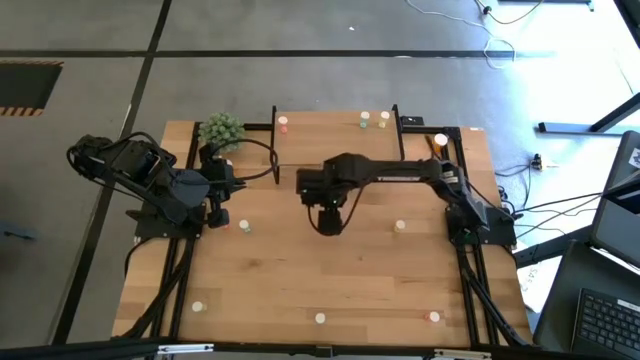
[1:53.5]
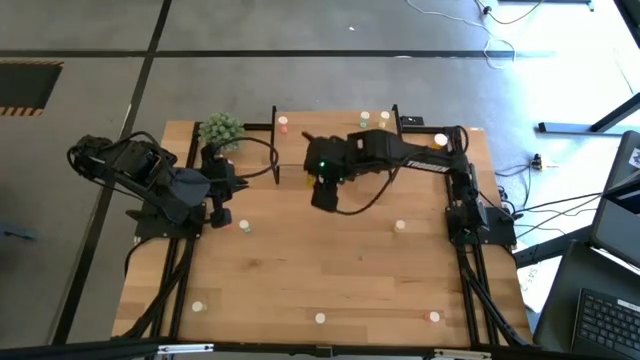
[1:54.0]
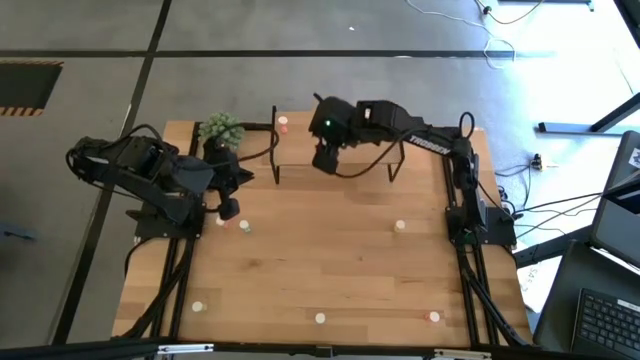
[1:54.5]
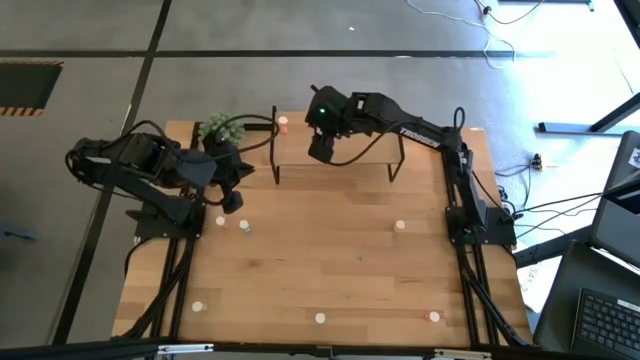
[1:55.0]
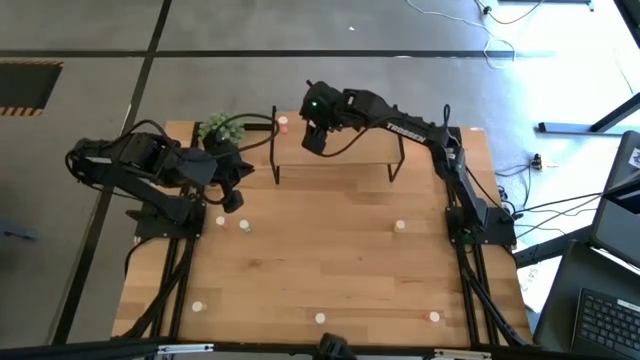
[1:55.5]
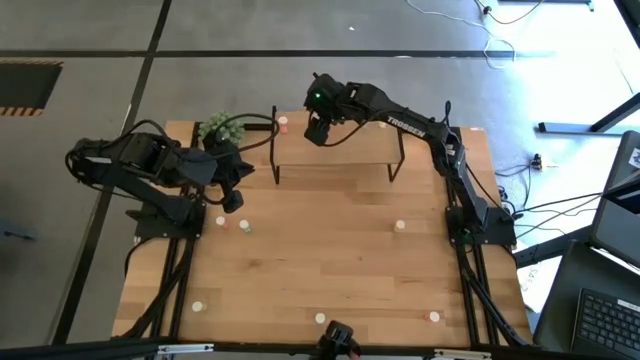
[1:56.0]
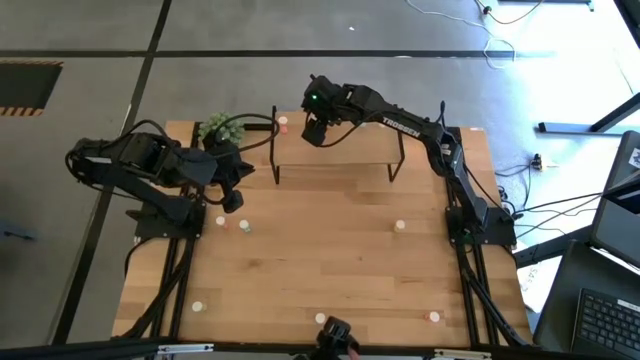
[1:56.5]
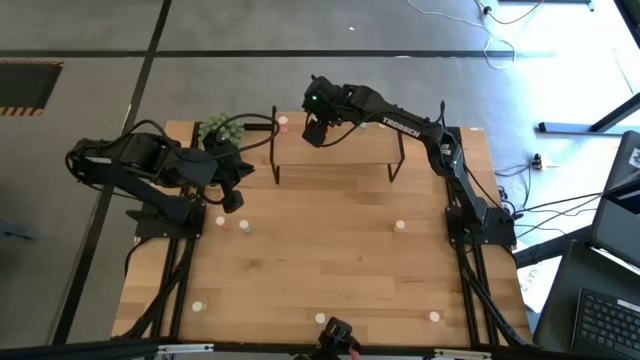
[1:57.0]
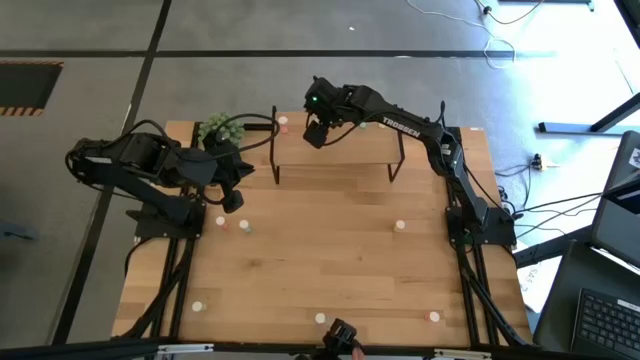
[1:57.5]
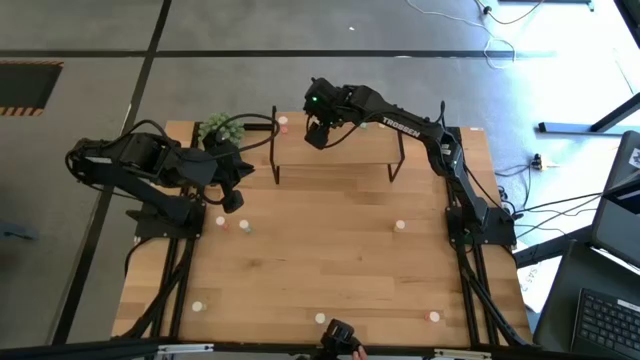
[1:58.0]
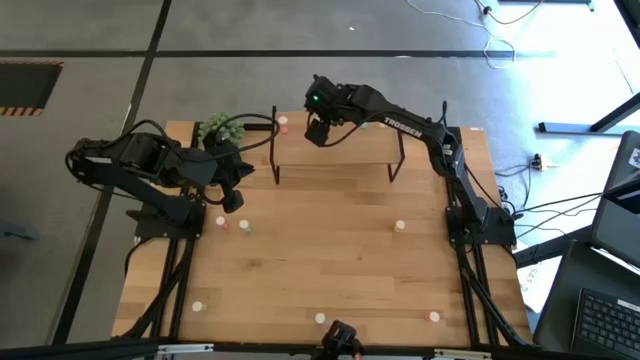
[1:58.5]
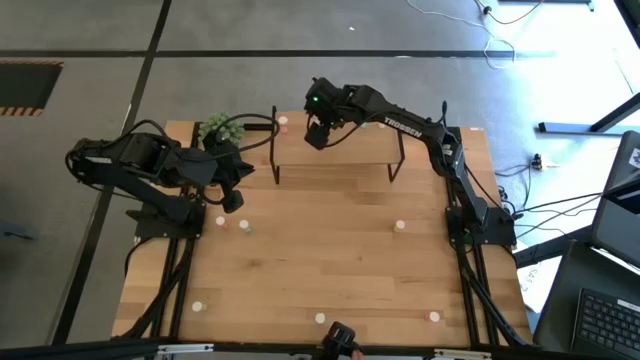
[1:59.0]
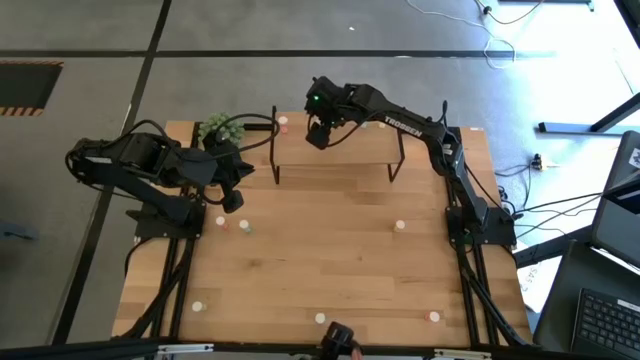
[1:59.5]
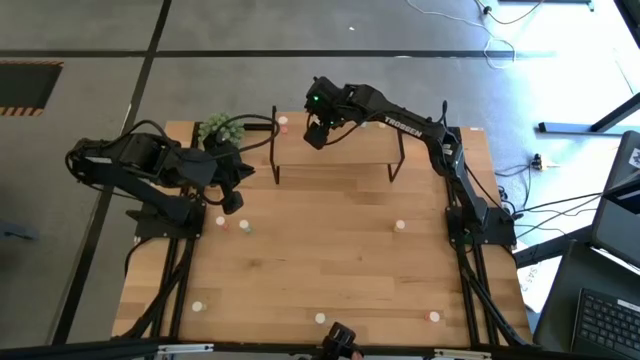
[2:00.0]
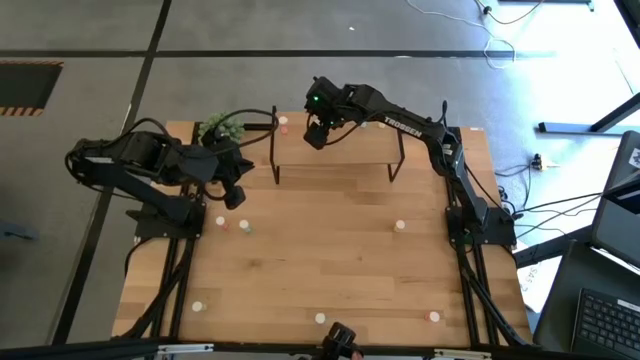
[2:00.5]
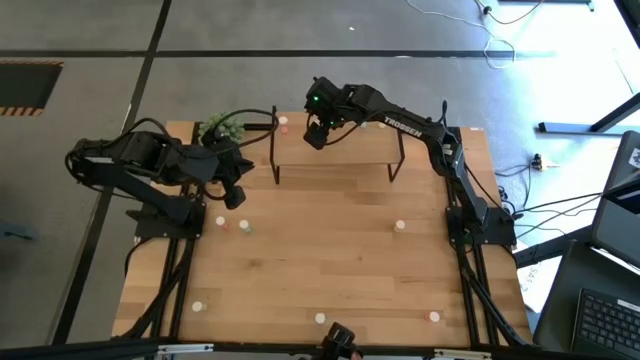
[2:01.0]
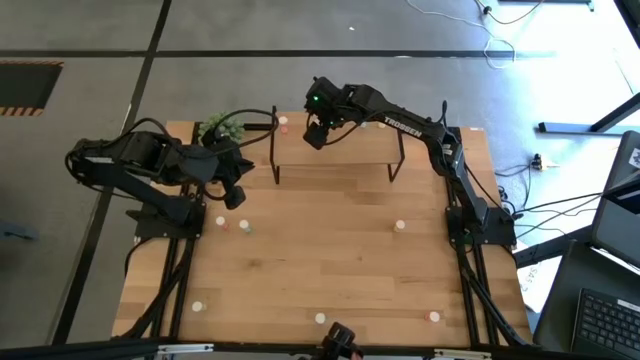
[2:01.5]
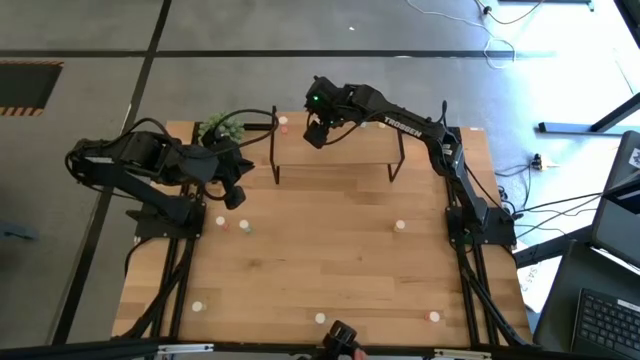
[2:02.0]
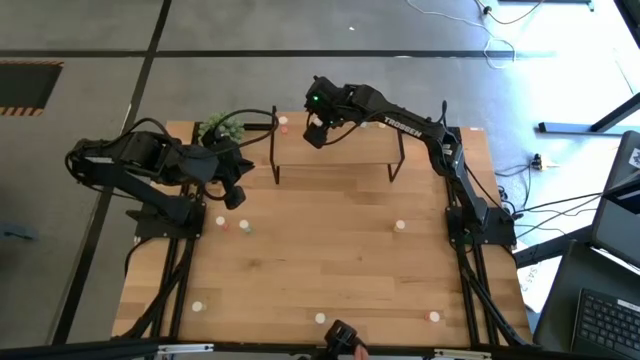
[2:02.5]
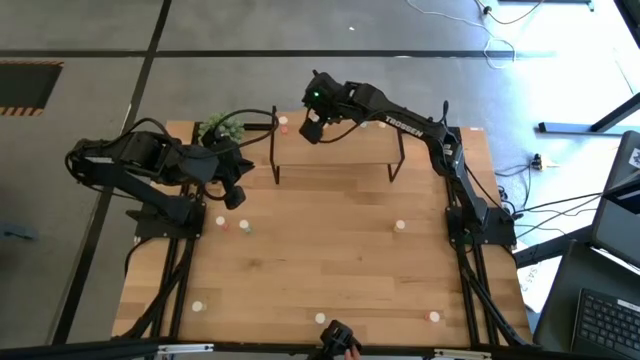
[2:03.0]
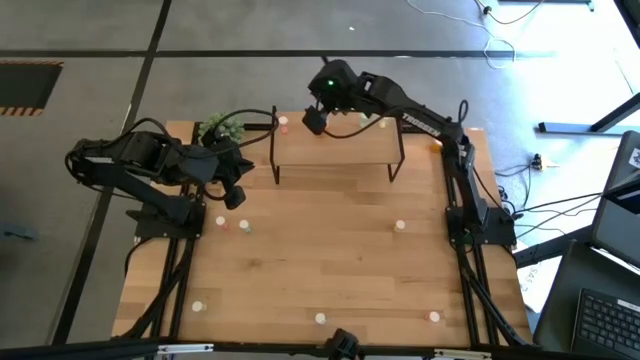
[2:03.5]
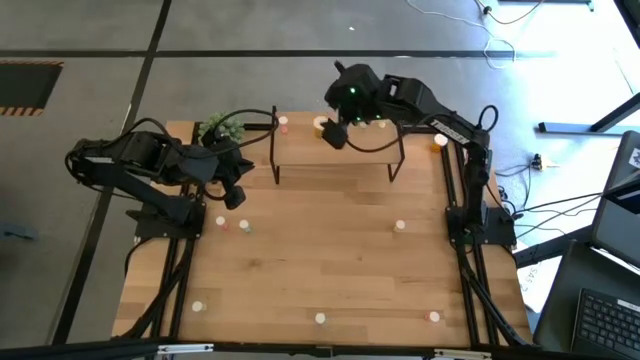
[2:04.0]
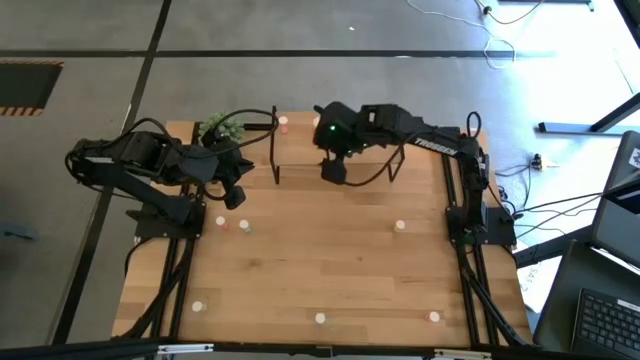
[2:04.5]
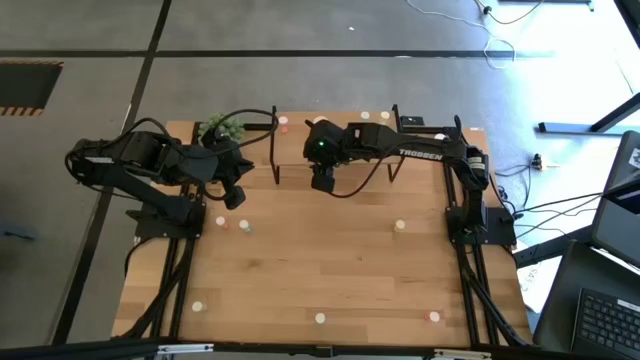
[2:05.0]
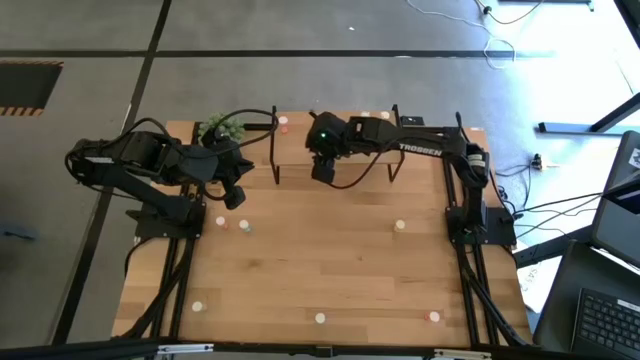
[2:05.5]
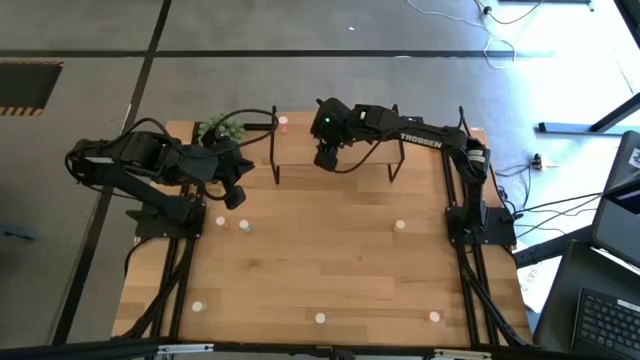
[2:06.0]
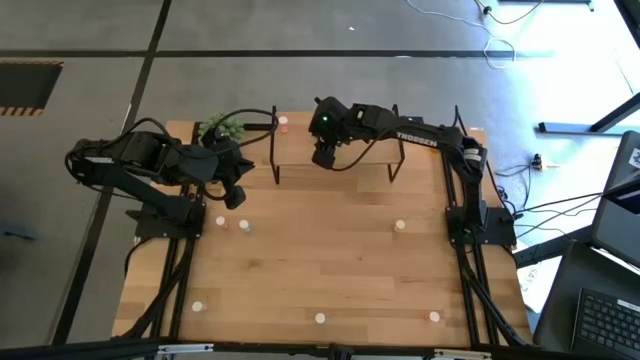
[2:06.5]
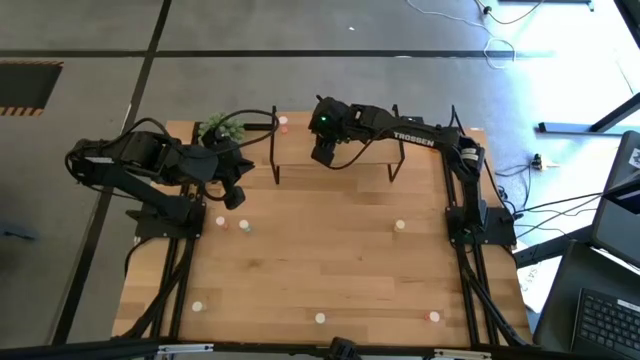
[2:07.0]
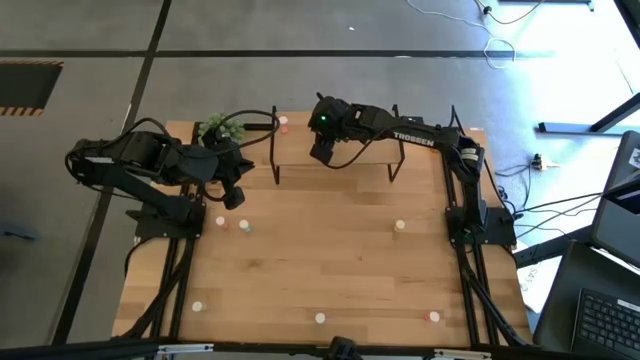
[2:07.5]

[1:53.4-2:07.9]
Task: Pick and place medicine bottles onto shelf by color
Put the center orange medicine bottle on the shelf

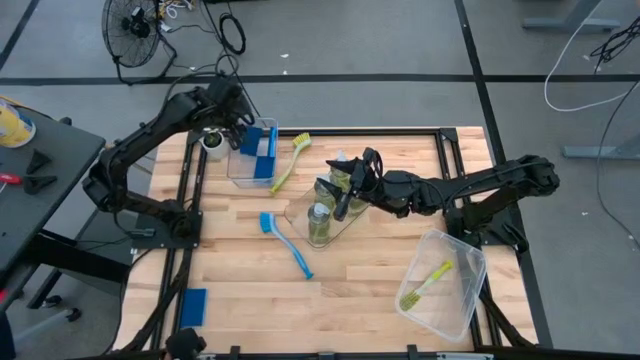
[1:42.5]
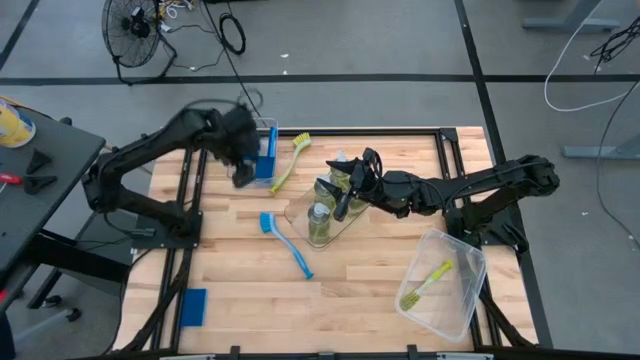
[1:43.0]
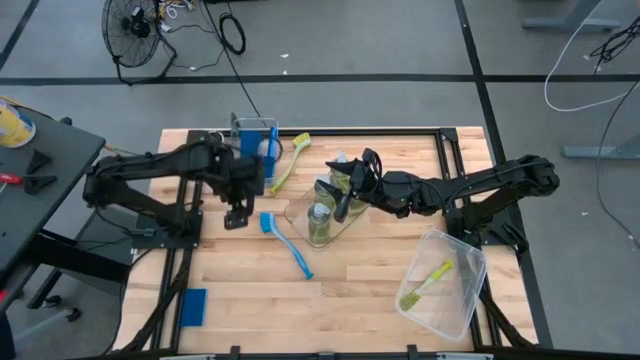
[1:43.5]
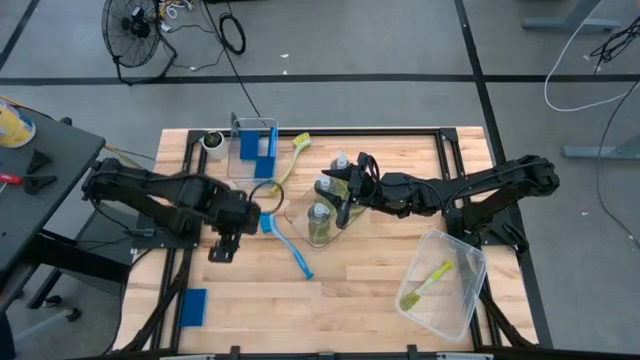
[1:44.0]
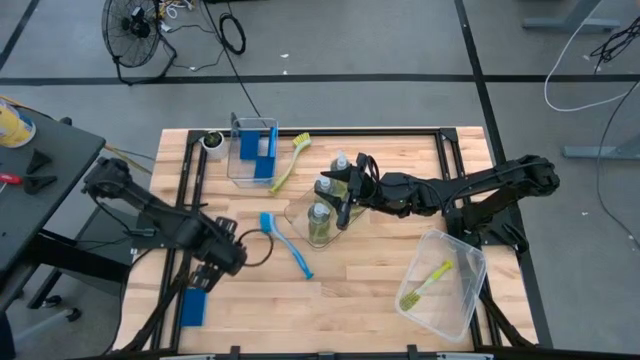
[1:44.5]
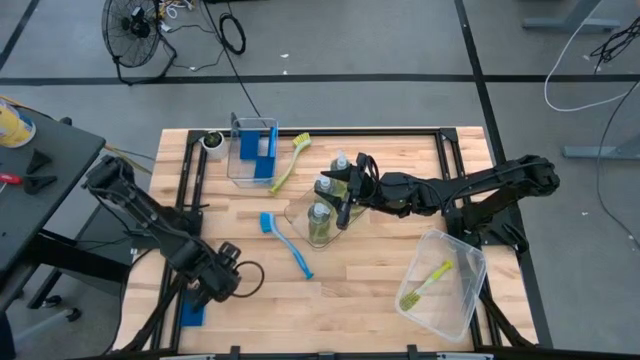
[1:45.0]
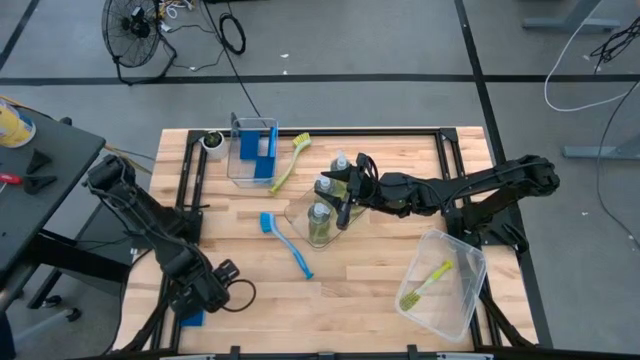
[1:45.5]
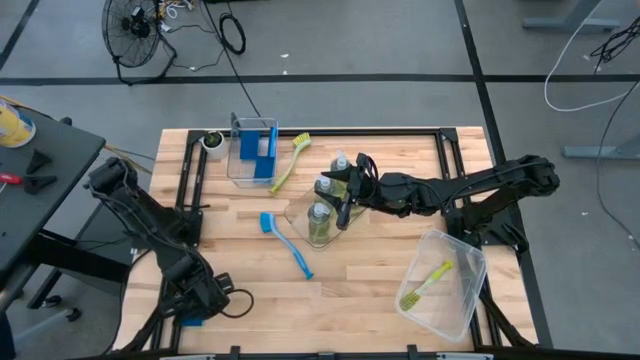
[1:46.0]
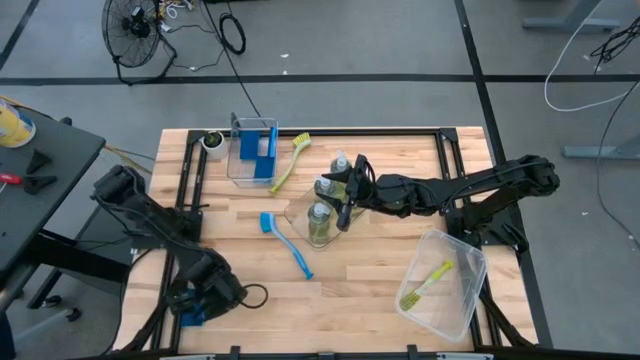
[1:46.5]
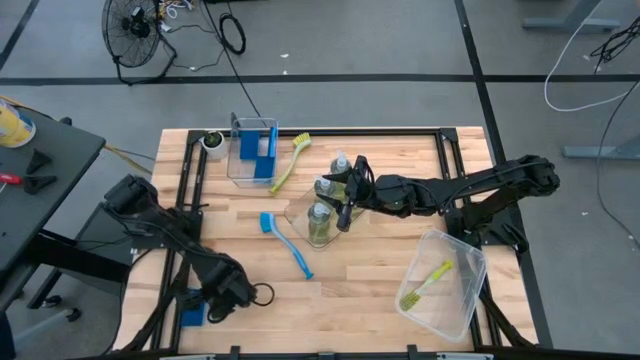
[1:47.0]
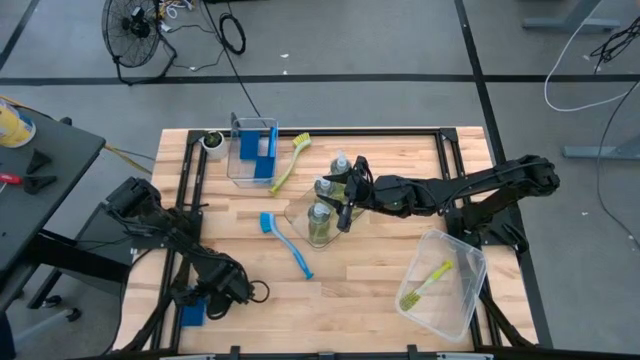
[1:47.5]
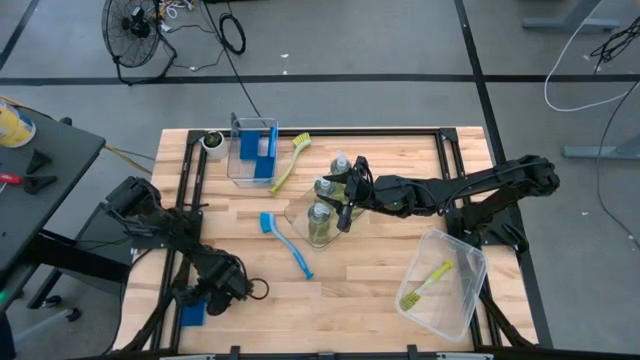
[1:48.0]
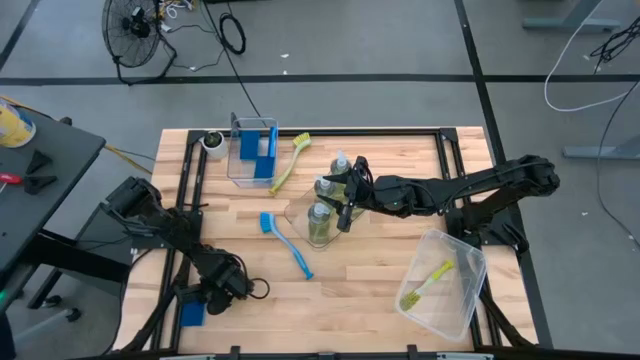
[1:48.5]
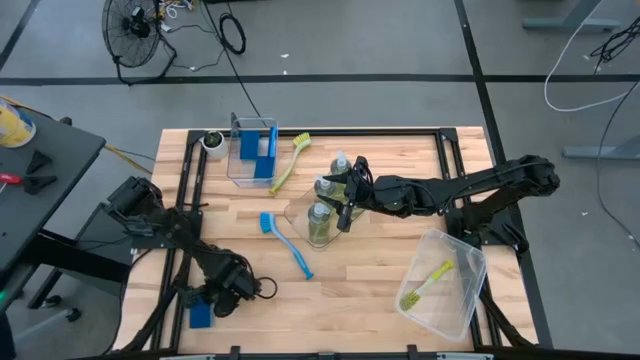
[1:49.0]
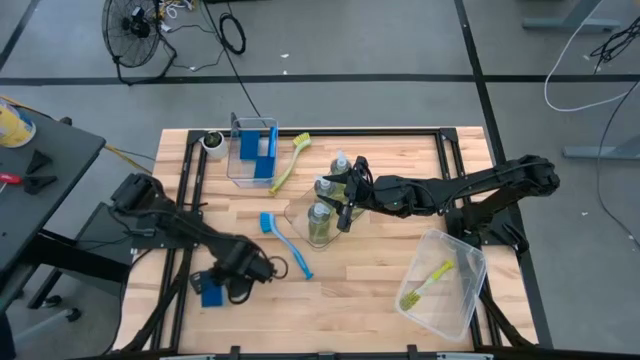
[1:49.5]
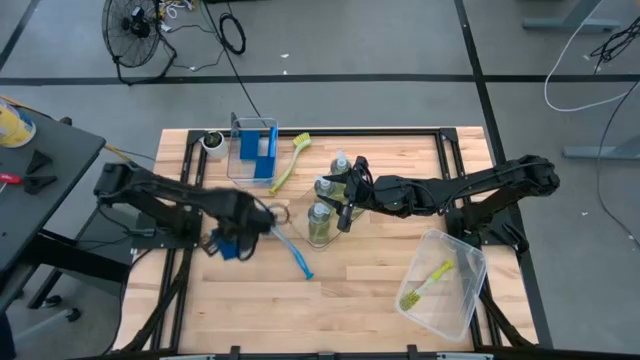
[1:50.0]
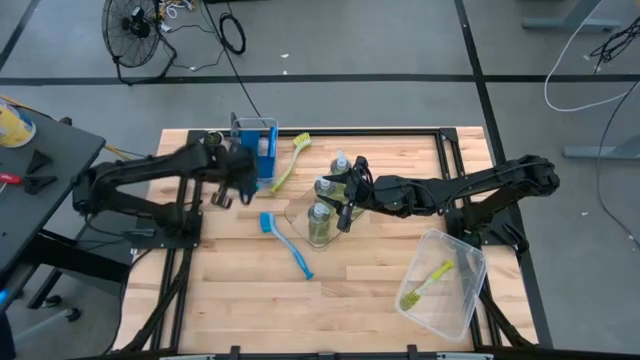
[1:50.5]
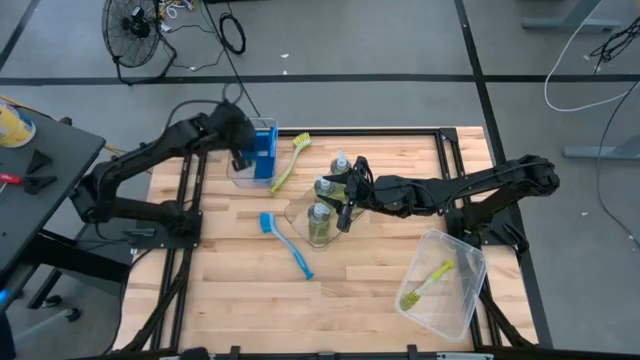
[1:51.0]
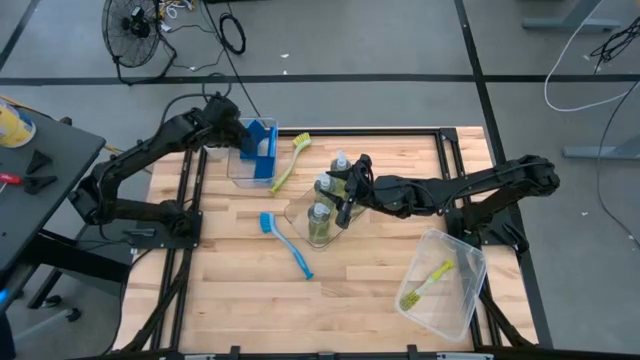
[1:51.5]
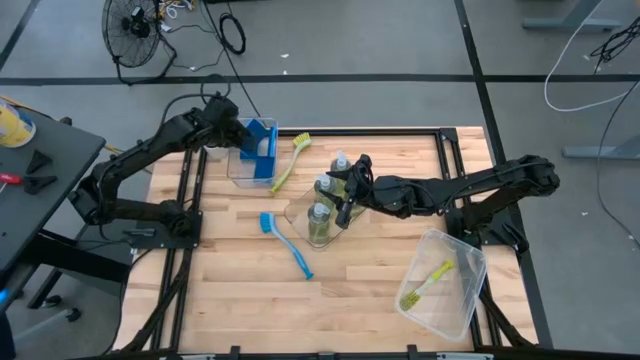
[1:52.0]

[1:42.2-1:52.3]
Task: Pick & Place Kitchen Sink Supplies
Put the blue sponge into the top transparent bin
